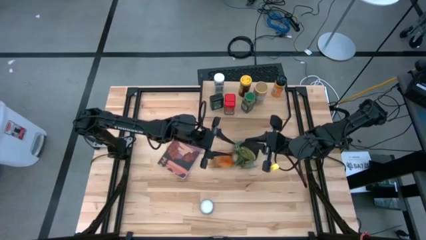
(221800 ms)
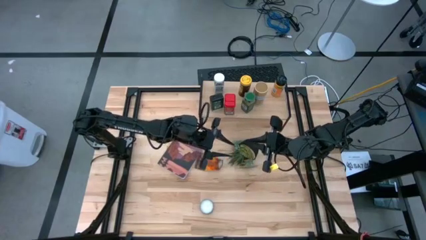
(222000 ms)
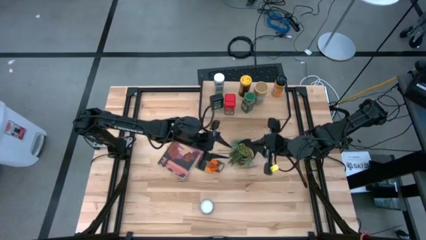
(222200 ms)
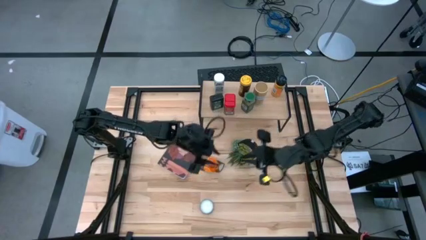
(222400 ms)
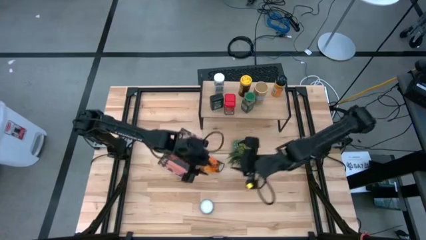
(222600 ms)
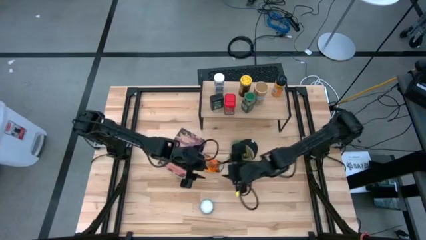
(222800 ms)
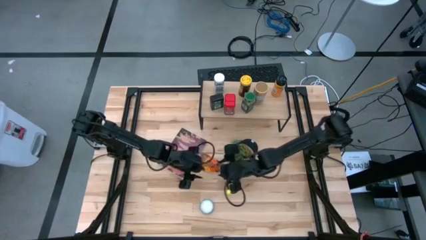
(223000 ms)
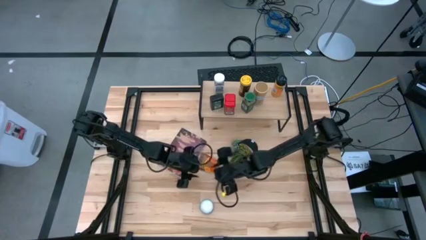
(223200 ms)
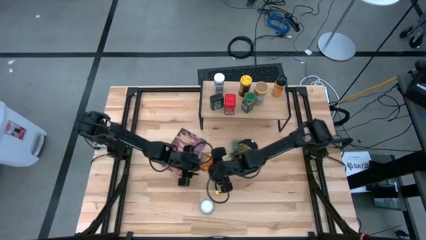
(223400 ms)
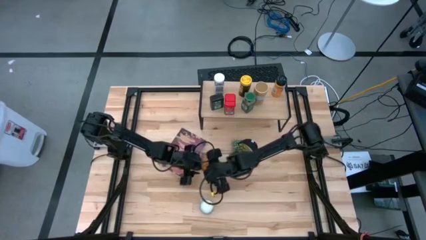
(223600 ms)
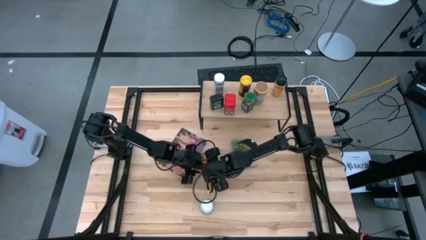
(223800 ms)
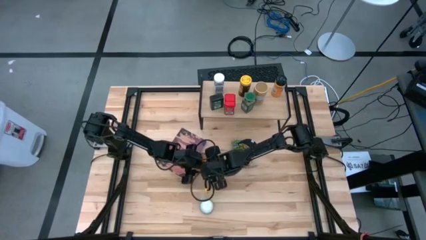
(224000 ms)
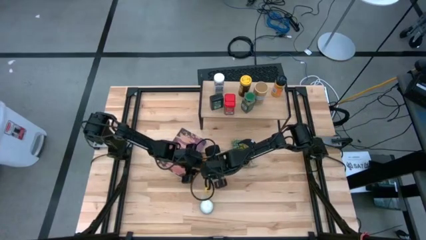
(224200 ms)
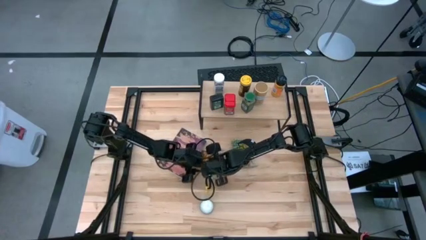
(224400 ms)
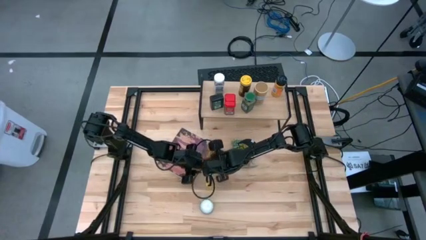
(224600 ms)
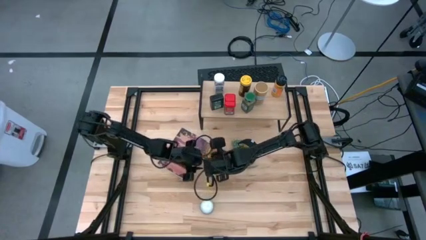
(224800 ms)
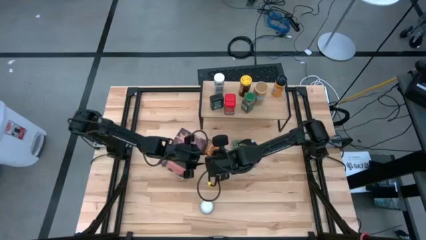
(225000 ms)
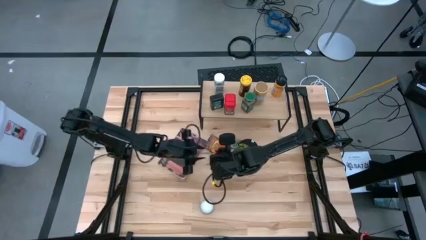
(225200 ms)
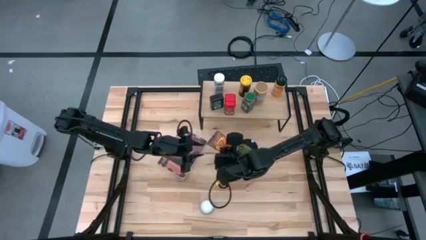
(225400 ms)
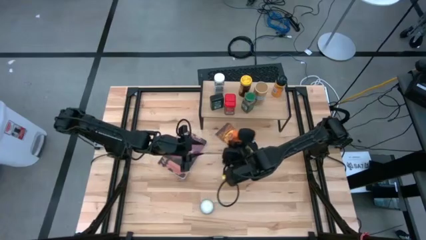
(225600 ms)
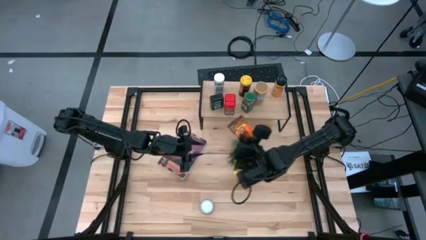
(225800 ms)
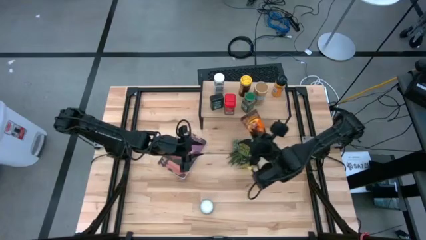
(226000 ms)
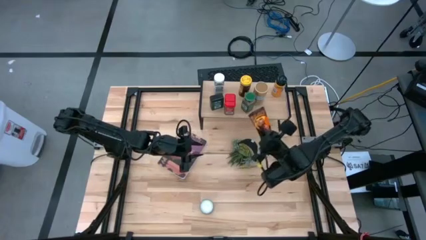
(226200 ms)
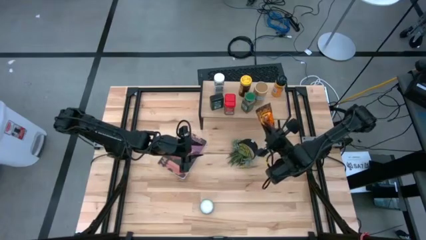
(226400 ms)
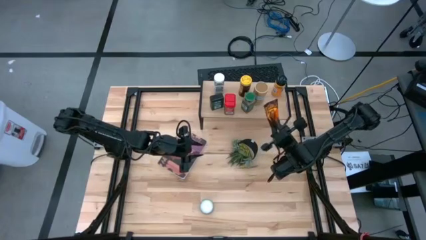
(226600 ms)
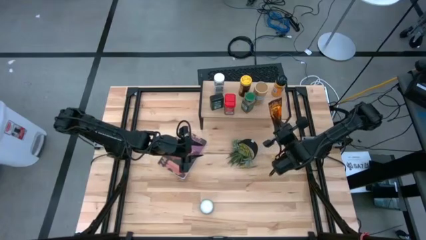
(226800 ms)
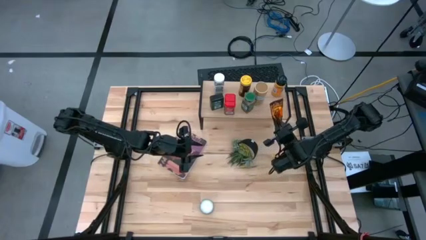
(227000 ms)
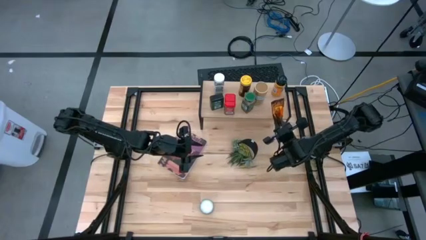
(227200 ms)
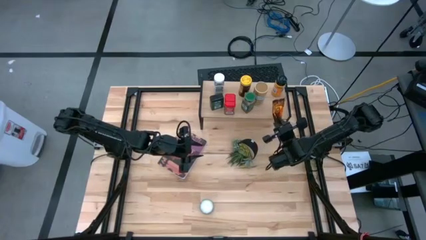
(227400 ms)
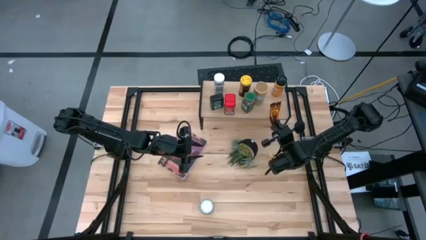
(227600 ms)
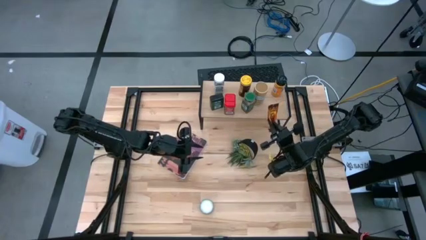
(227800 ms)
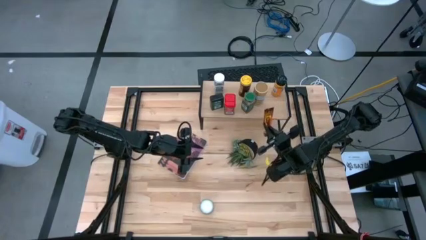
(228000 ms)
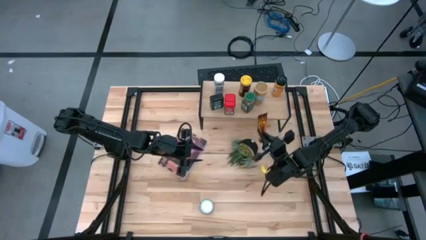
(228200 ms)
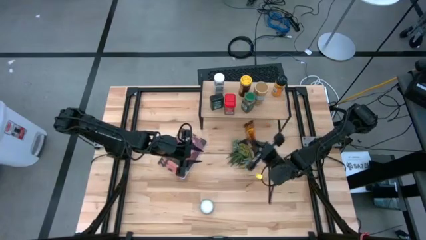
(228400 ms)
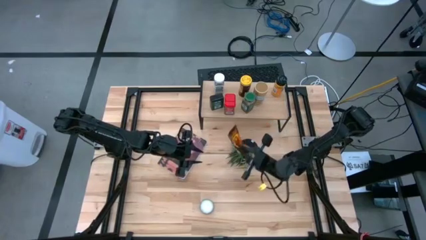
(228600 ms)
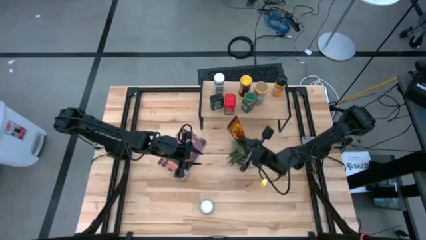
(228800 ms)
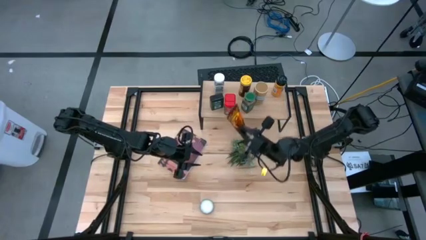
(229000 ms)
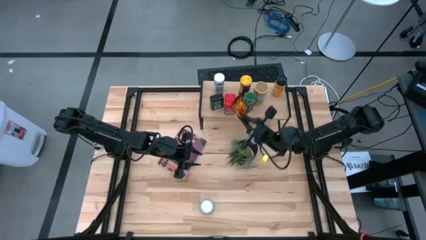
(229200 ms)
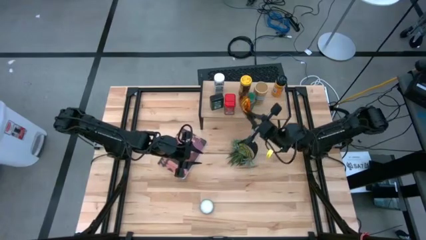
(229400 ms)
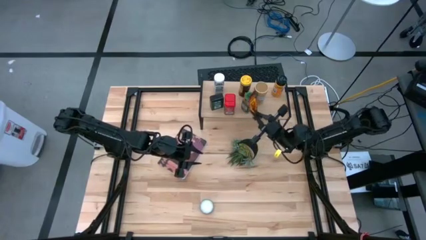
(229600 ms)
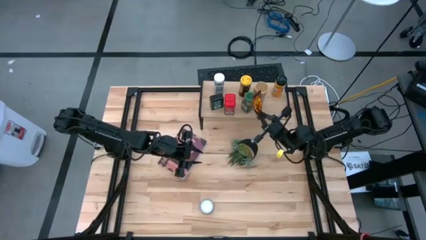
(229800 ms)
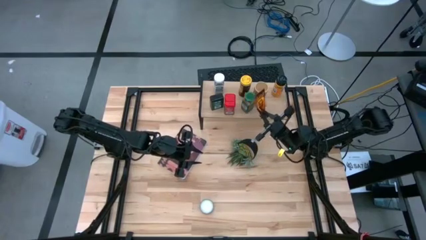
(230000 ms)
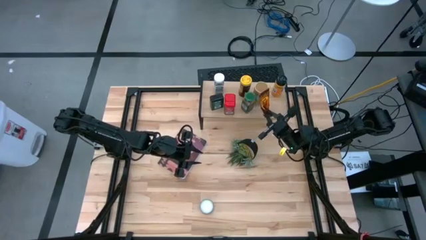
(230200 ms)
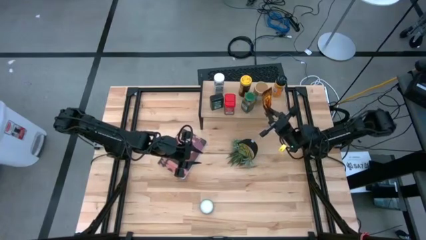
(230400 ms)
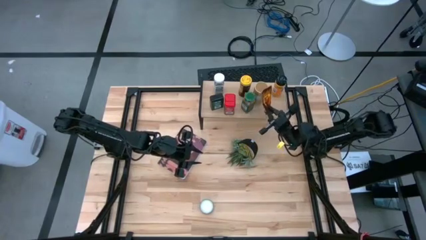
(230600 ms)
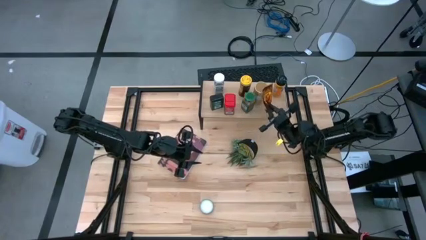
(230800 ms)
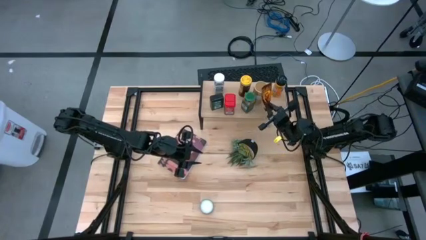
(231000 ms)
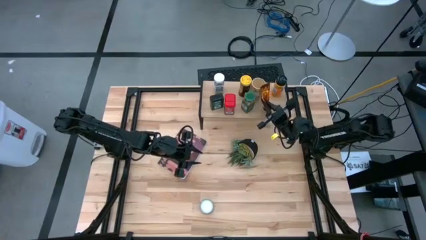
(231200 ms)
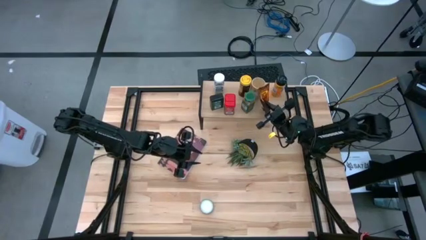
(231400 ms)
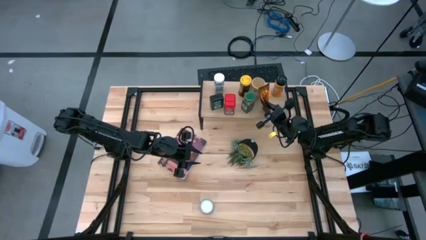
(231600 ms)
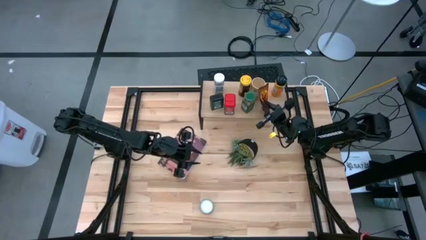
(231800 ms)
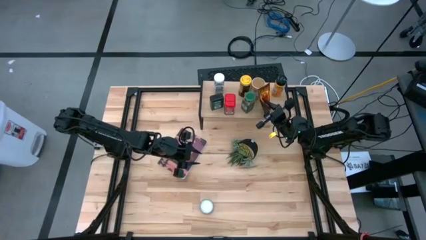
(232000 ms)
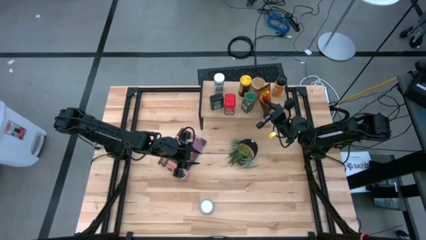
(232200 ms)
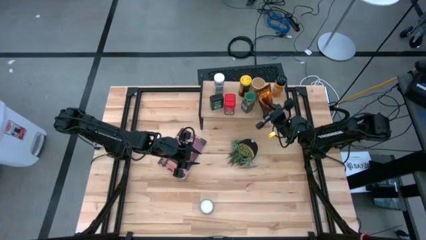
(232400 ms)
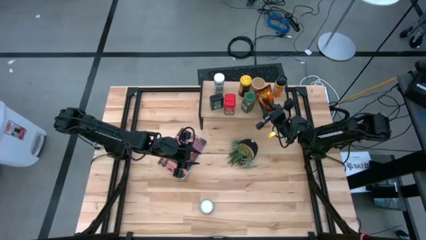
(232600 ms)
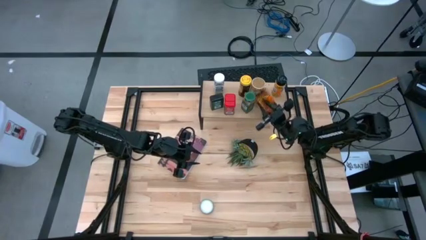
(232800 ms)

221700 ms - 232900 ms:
Task: Shelf spices
Put the orange seasoning bag on the shelf

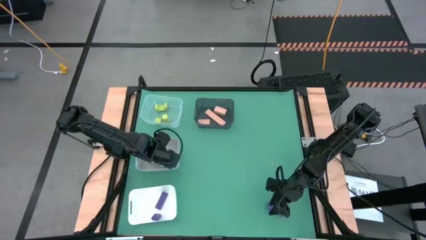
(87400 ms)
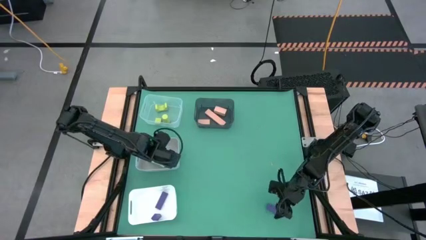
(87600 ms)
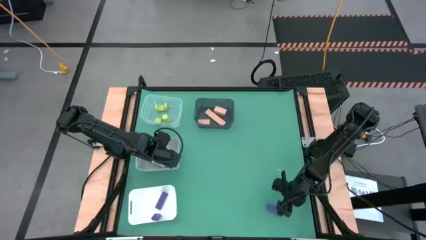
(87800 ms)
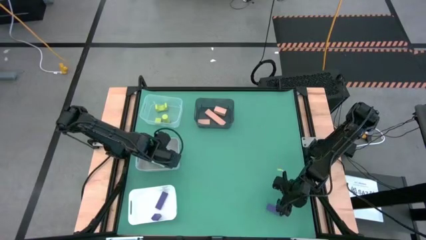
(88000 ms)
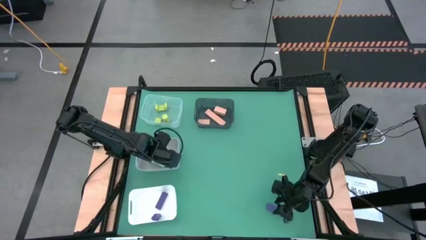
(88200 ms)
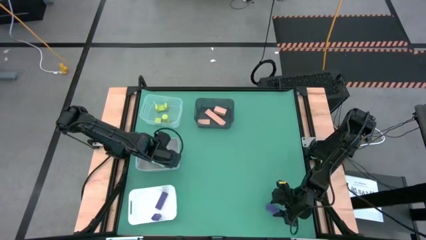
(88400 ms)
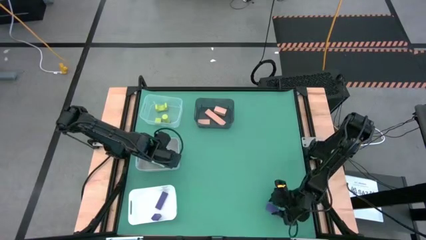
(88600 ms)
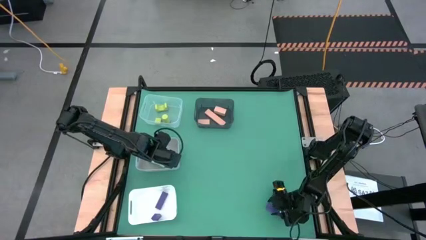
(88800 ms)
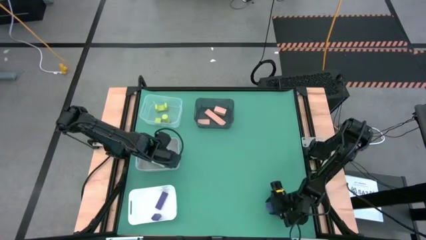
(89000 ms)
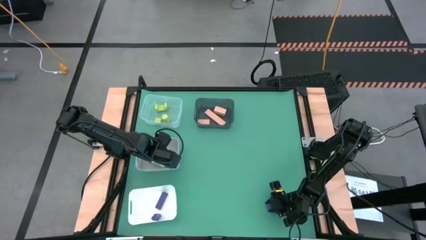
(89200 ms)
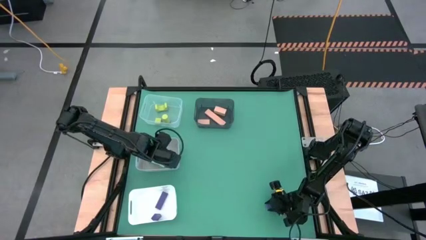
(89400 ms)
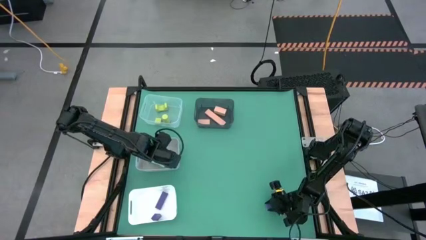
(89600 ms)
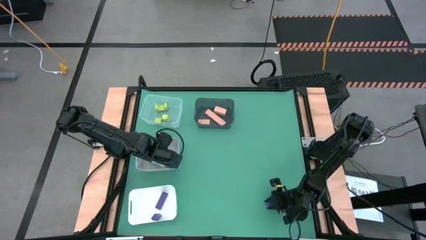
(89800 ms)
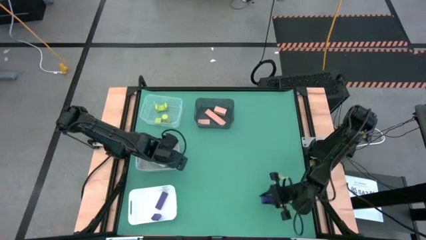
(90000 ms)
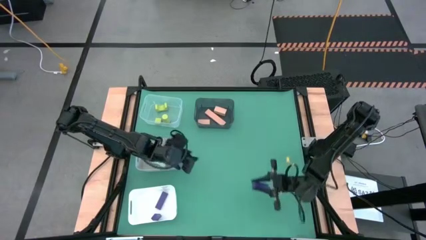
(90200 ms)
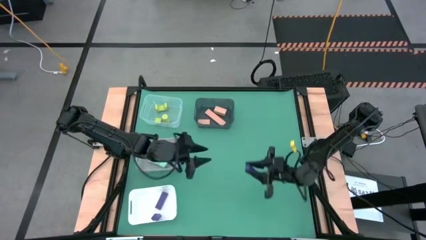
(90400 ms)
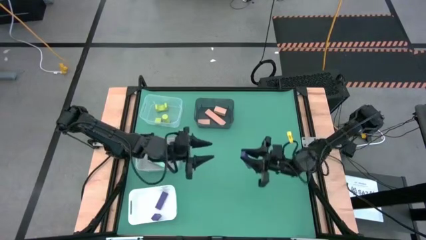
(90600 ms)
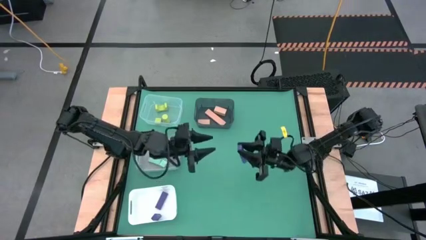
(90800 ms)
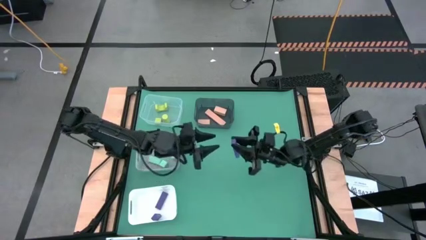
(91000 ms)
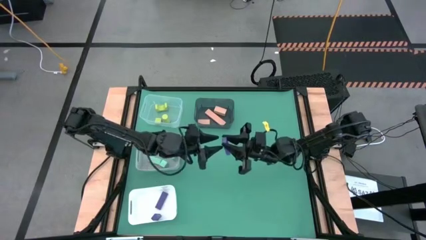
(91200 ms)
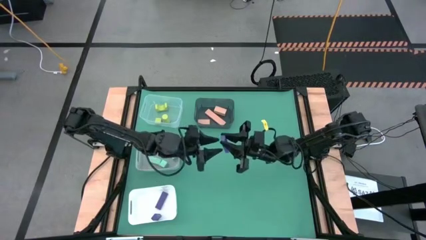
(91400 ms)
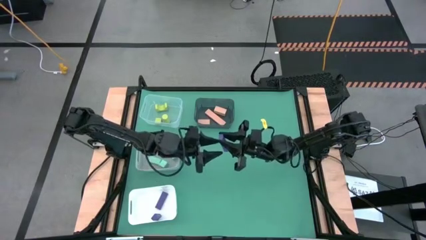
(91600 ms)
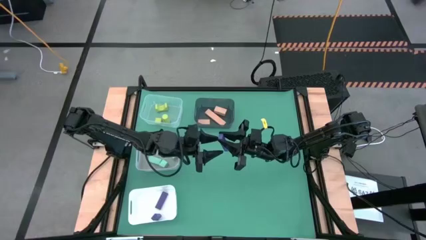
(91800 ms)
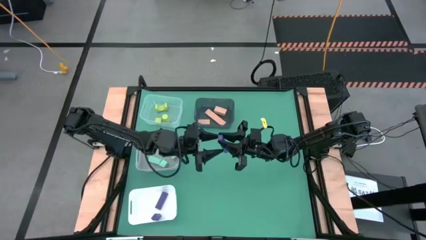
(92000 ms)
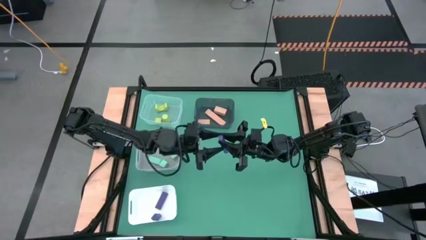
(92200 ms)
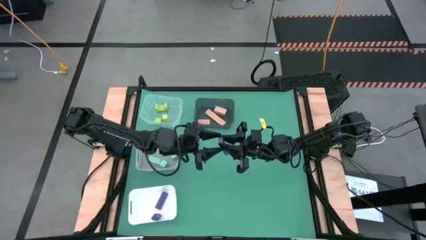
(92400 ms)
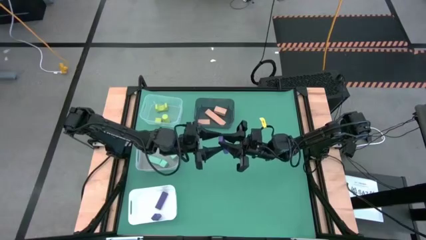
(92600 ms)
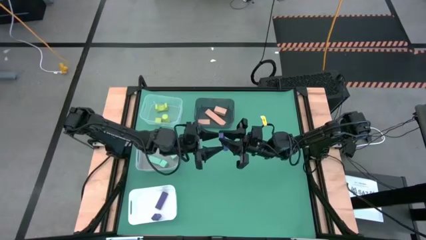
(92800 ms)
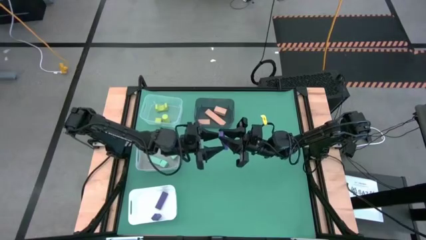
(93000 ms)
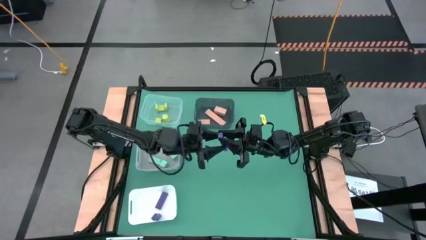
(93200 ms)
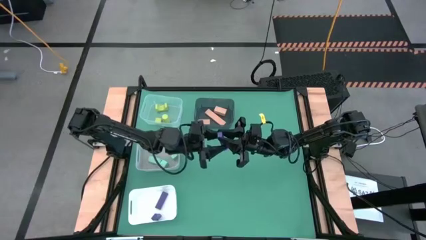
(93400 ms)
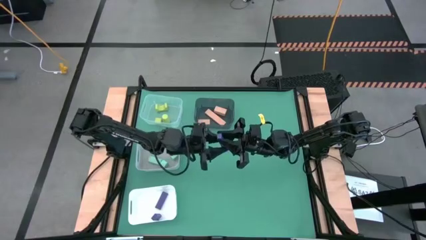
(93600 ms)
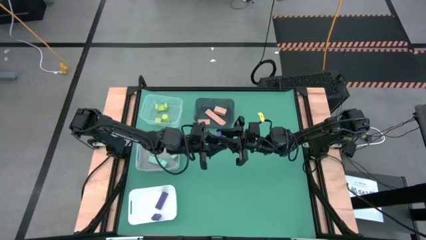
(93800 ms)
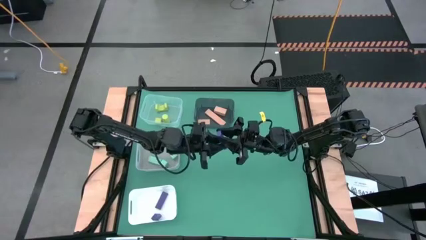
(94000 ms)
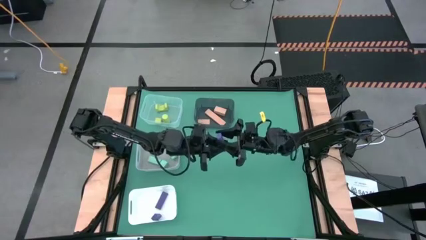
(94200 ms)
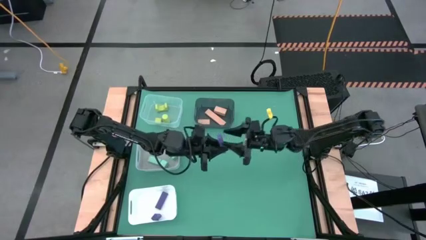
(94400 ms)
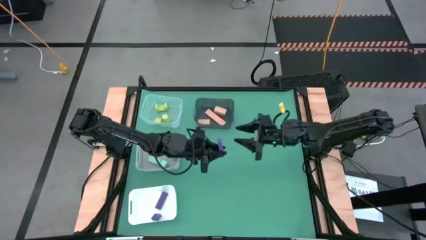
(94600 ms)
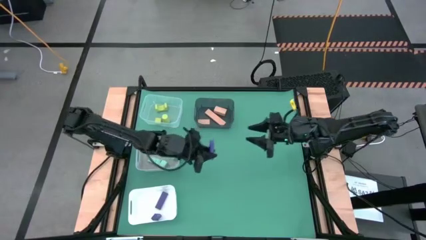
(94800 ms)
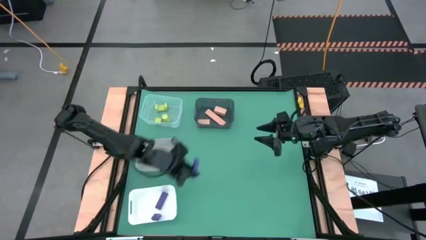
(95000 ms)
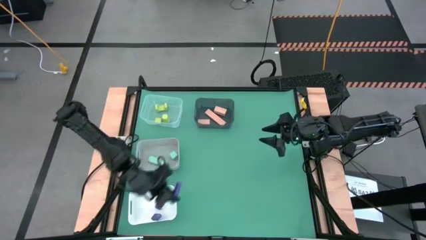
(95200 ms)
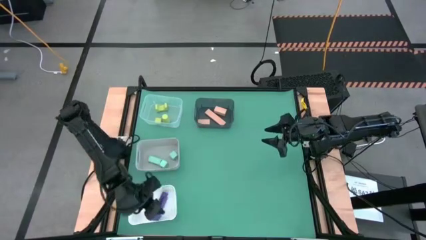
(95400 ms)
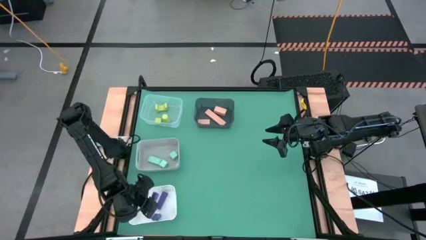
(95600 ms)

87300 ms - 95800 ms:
Task: Sort & place blocks by color
Put the violet block into the white bin
